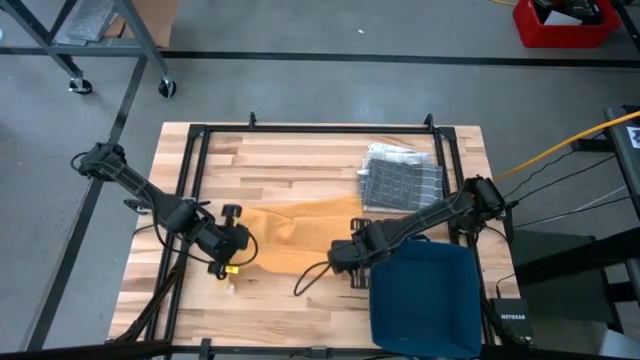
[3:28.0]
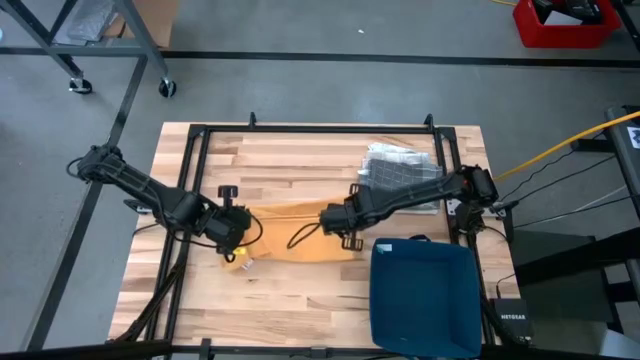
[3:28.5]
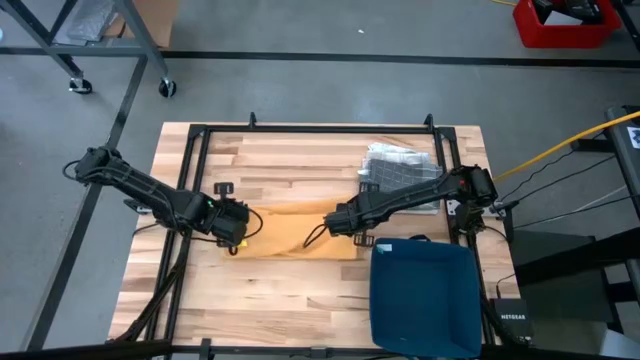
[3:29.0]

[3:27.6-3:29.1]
Task: Fold towel
Fold yellow towel

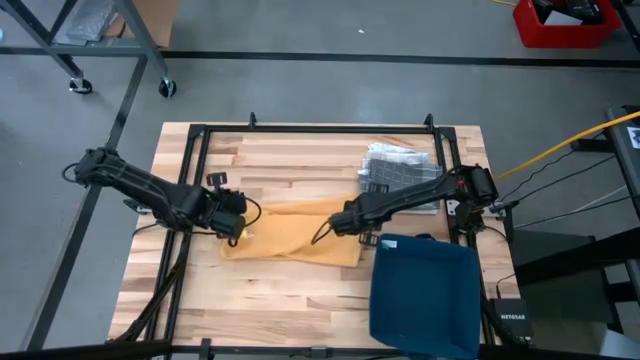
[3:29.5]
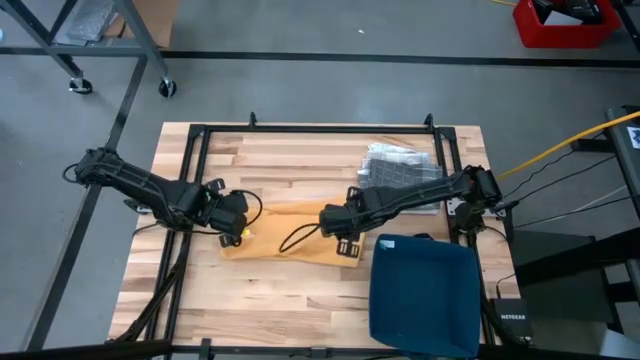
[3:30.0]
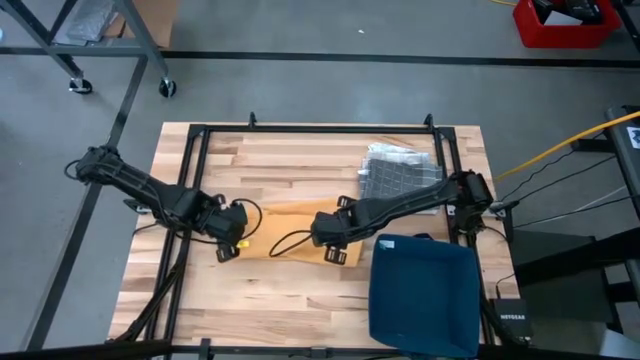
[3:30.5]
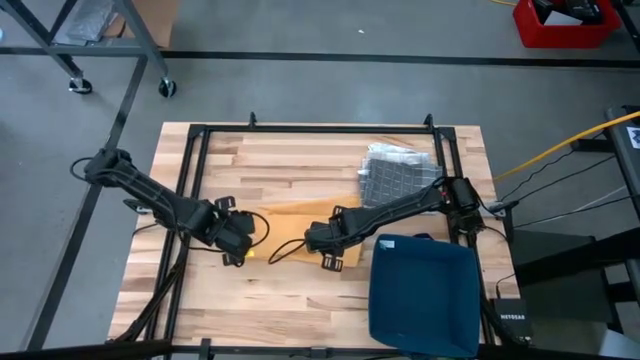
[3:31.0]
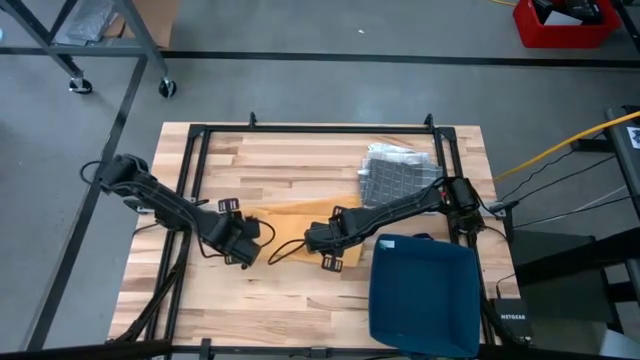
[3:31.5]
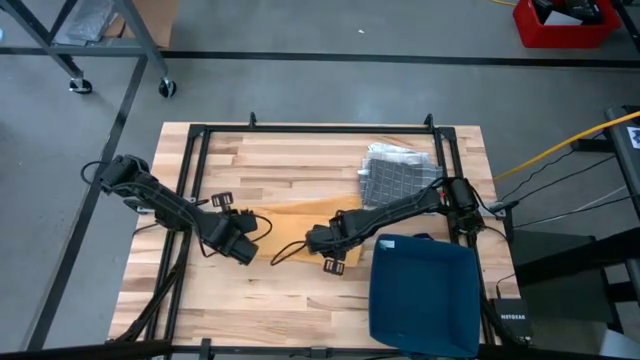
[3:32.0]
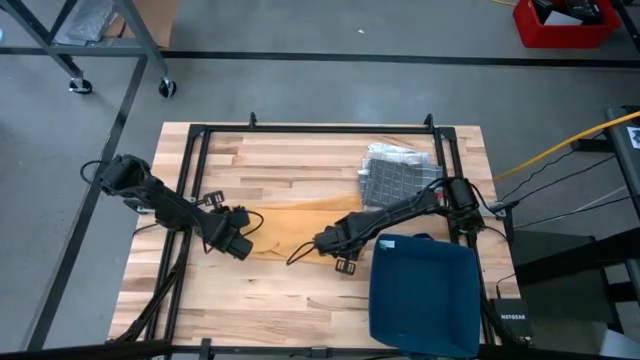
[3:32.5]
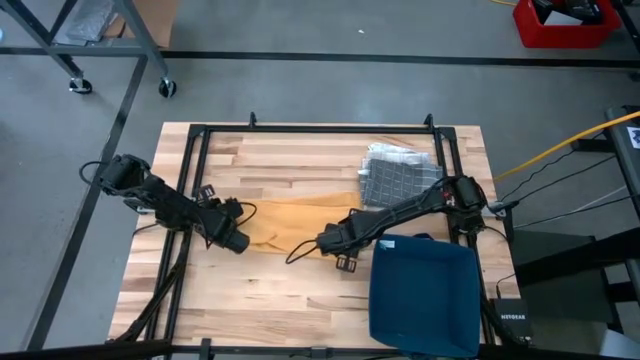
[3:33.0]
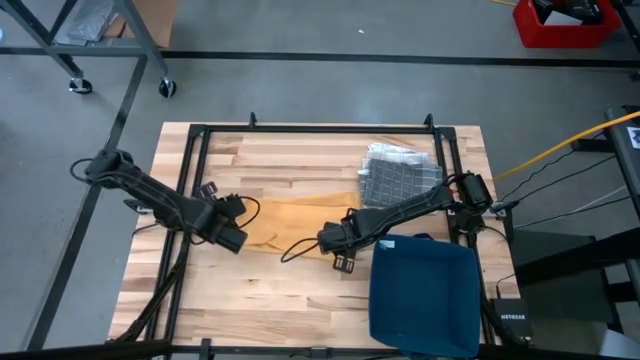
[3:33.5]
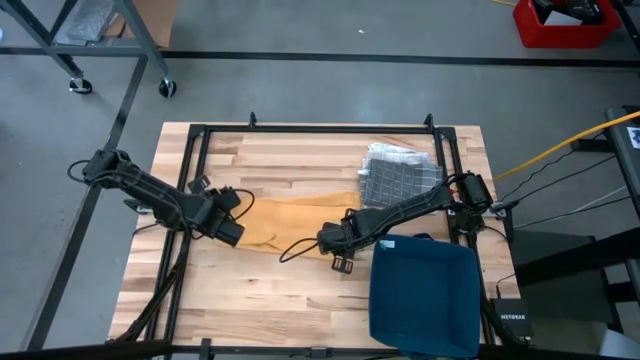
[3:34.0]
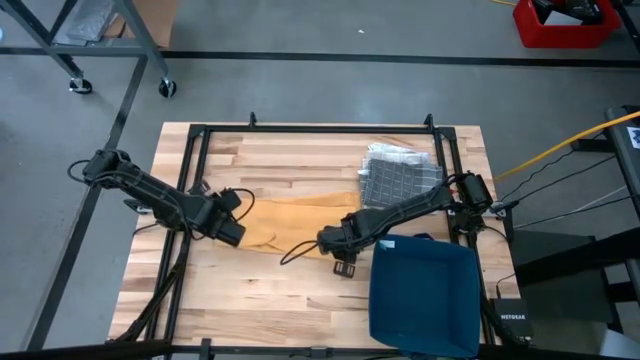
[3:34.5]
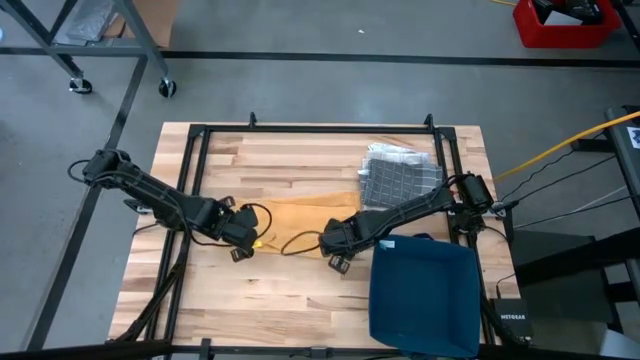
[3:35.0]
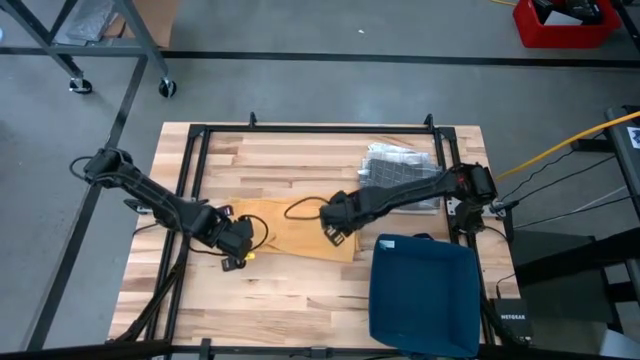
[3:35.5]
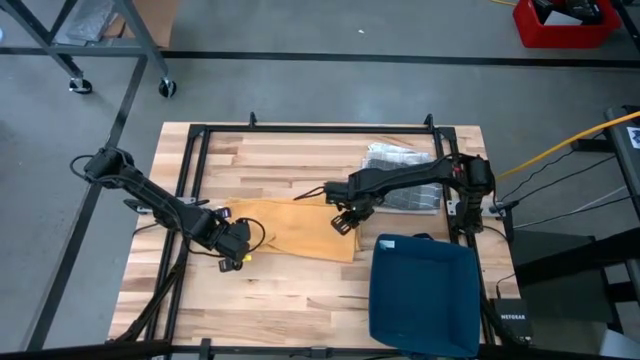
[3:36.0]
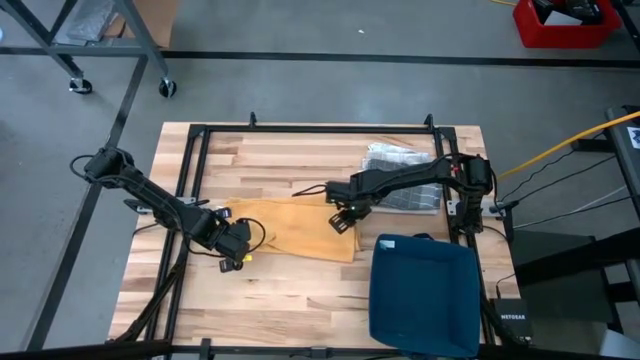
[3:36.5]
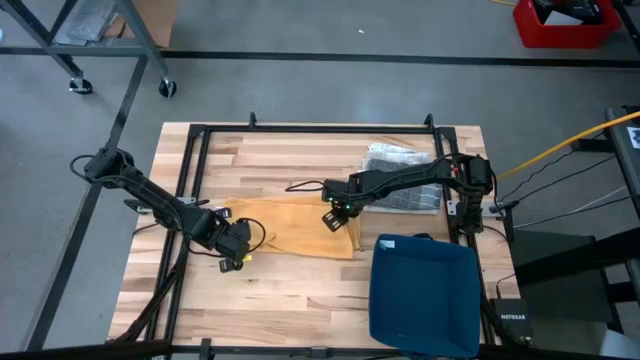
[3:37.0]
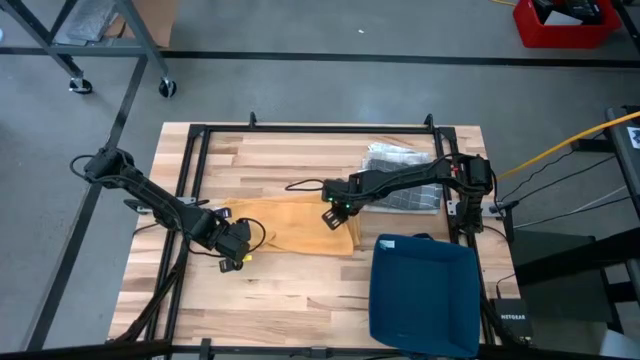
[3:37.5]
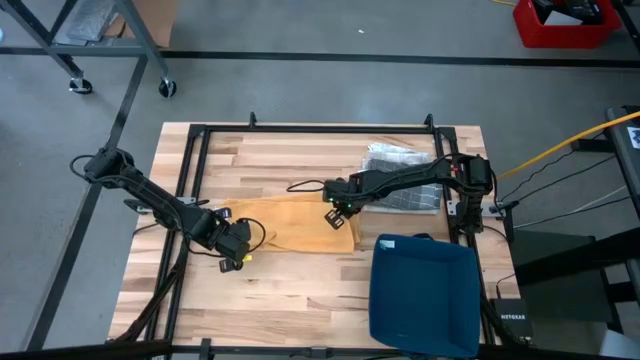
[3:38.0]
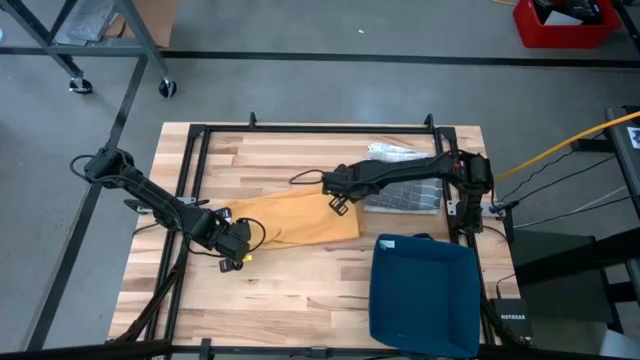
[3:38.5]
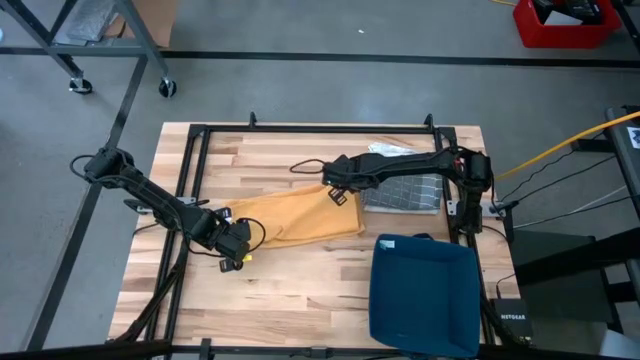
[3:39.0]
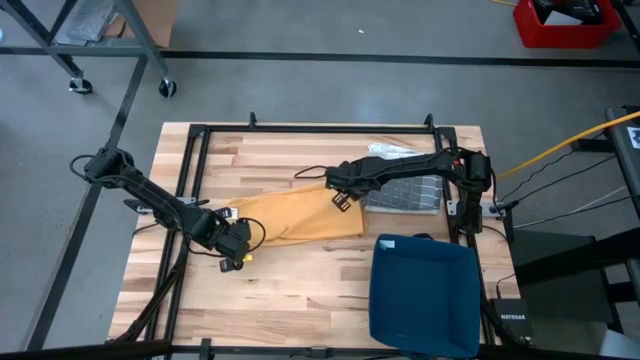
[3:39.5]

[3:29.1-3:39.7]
Fold yellow towel

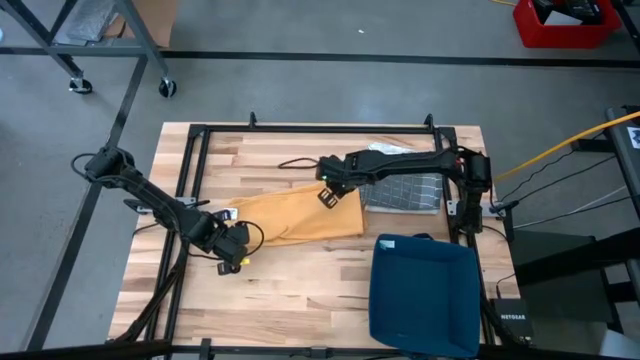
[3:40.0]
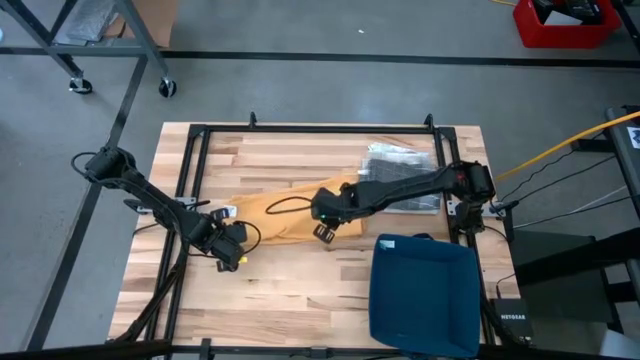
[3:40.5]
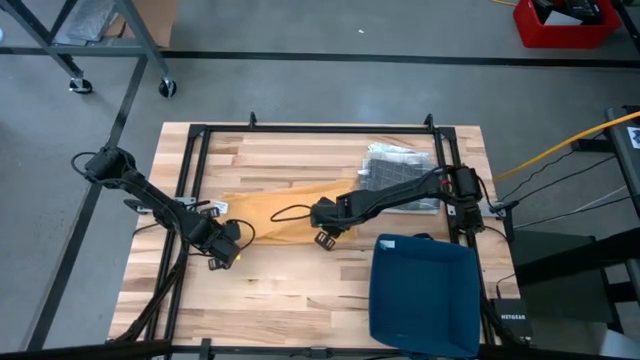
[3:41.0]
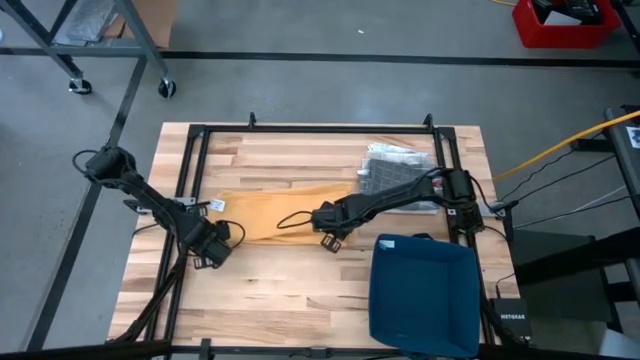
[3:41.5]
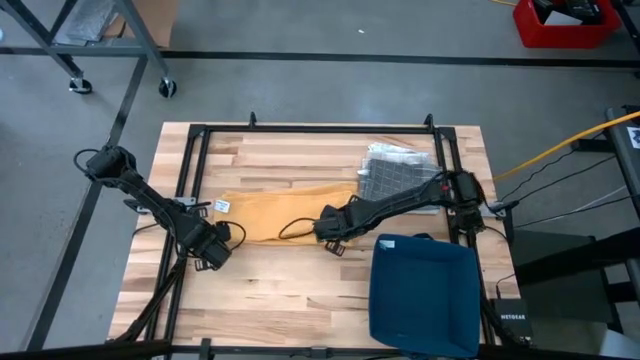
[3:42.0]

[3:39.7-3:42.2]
Fold yellow towel

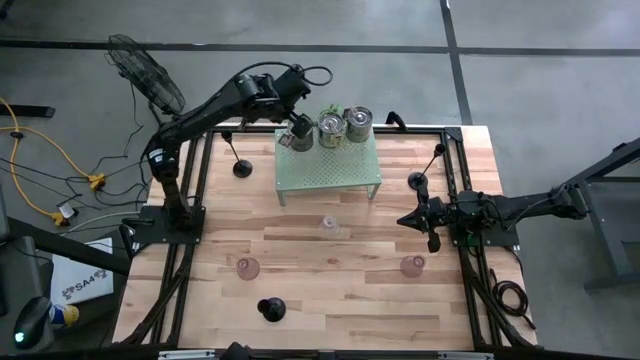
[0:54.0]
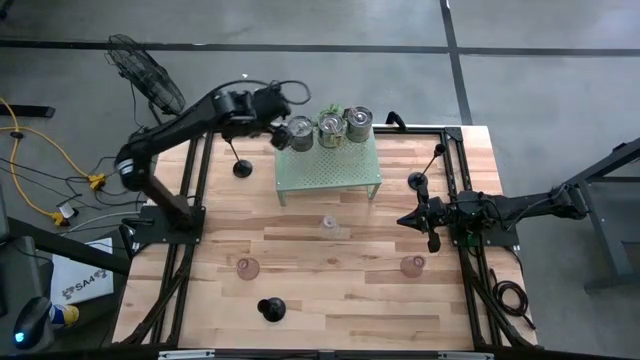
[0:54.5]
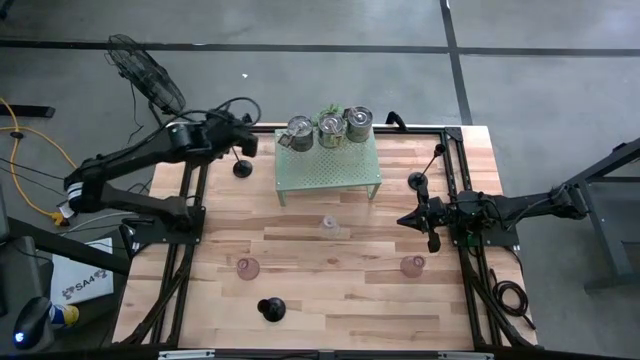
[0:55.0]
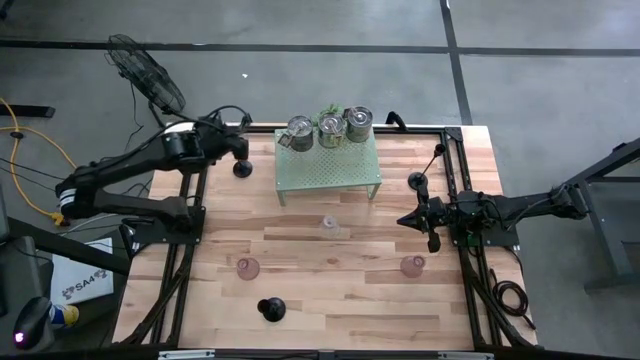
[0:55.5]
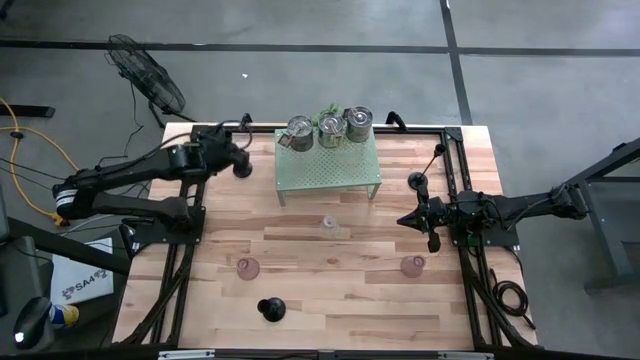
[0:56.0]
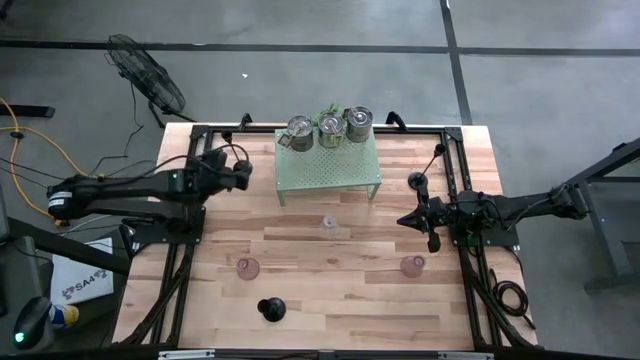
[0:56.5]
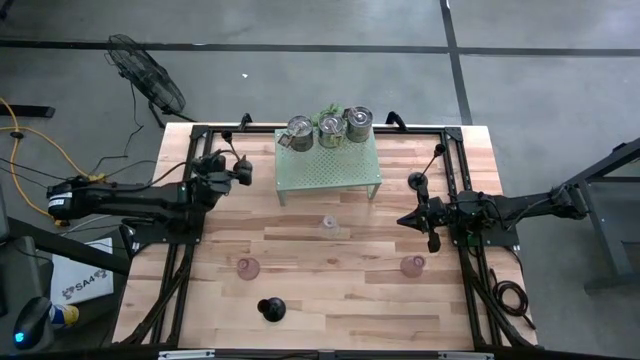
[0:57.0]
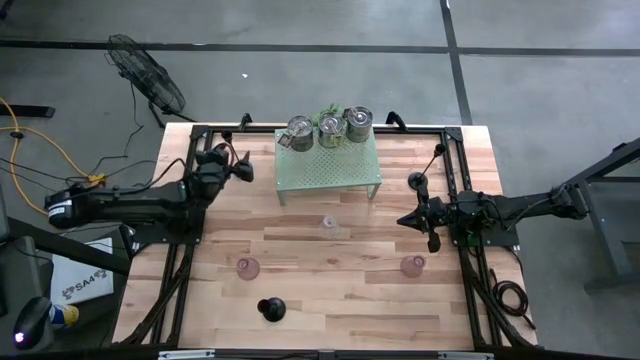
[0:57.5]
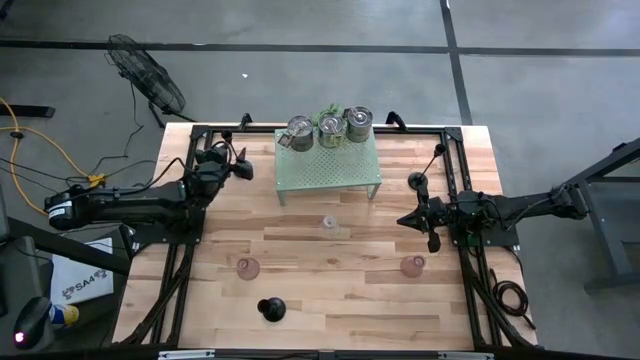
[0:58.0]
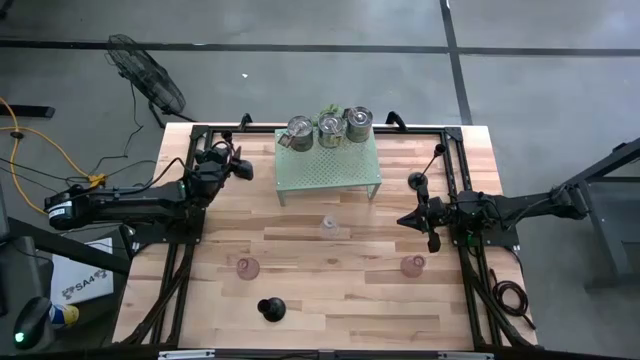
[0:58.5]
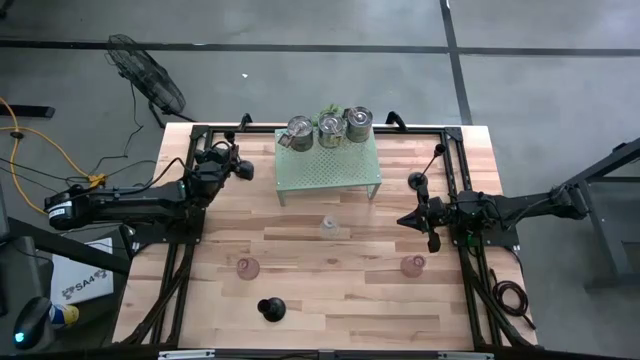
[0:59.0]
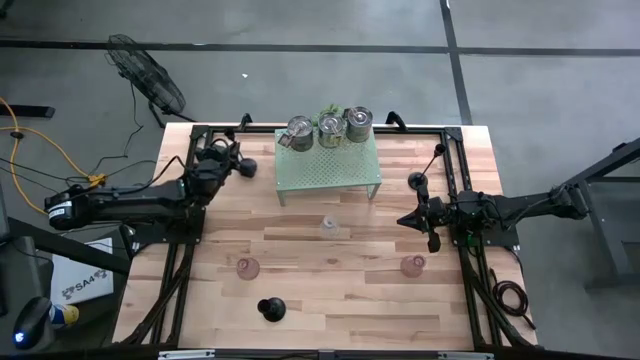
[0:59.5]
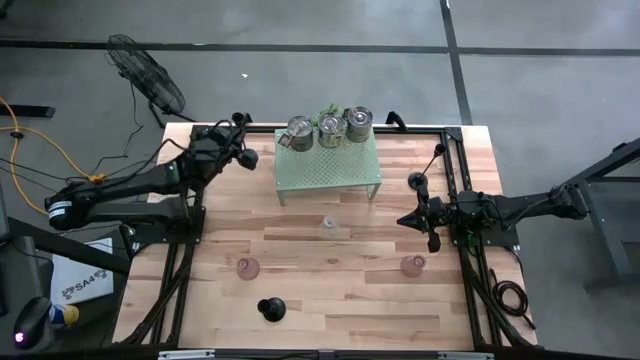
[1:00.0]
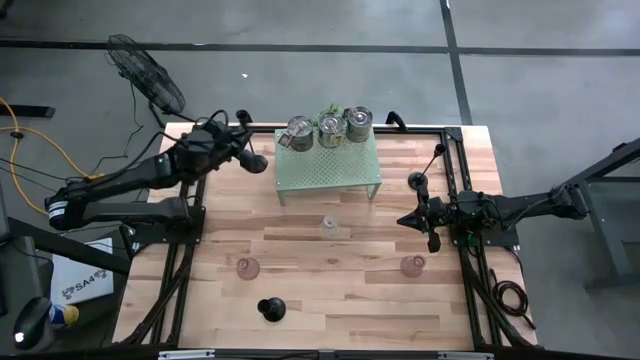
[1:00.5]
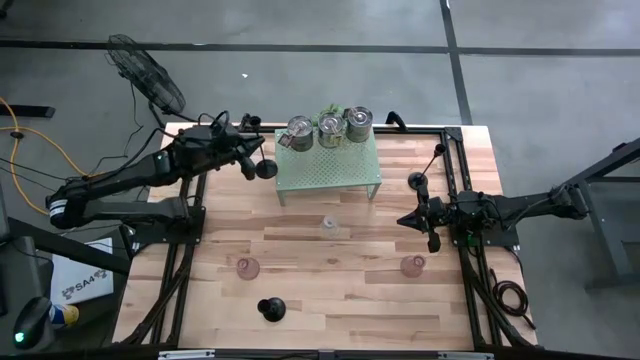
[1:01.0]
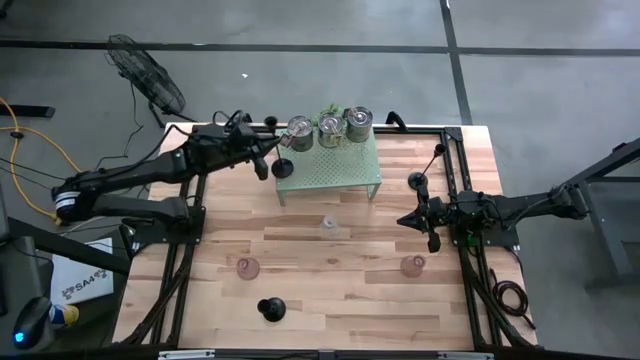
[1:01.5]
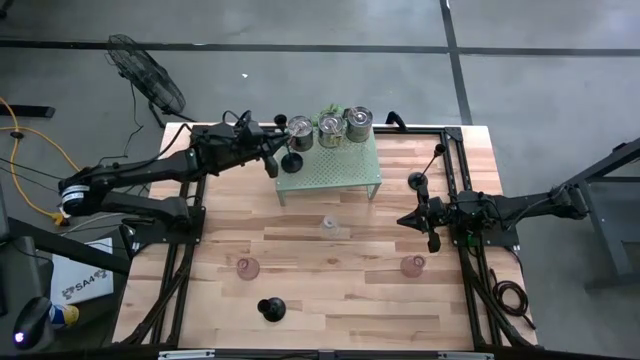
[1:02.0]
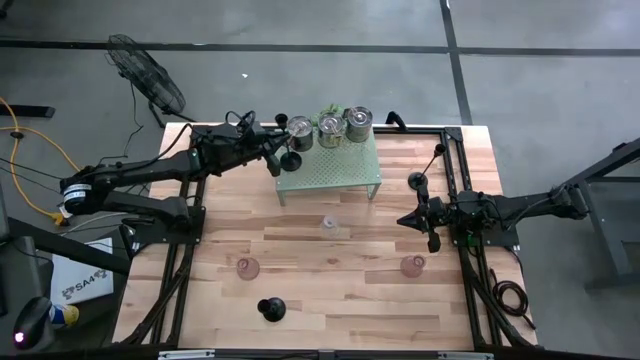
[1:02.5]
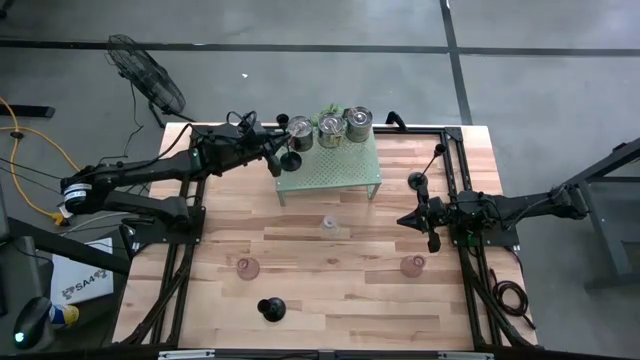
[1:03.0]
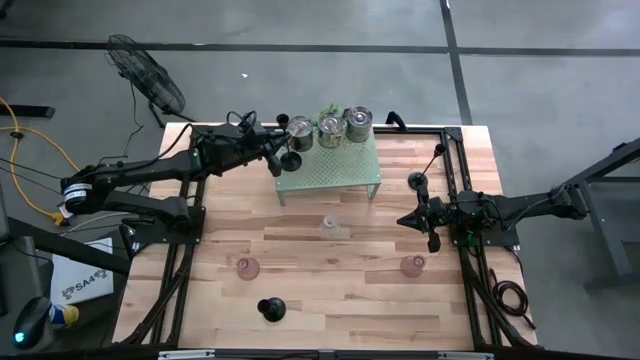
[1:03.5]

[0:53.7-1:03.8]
Task: Pick & Place candle stick holders
Put the top left black candle holder on the shelf
